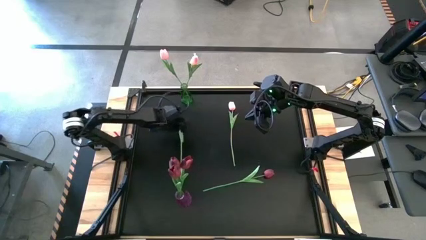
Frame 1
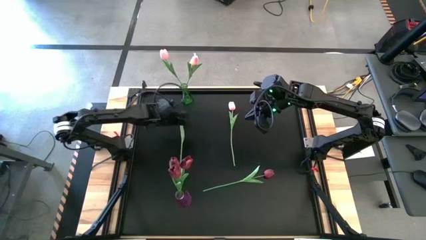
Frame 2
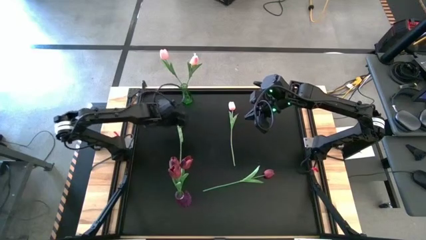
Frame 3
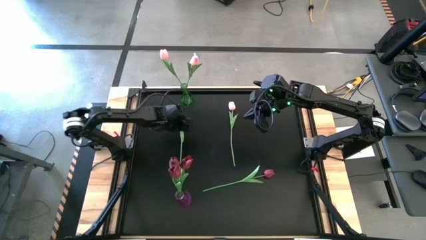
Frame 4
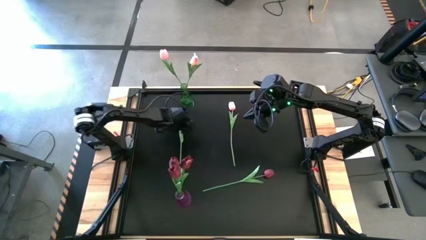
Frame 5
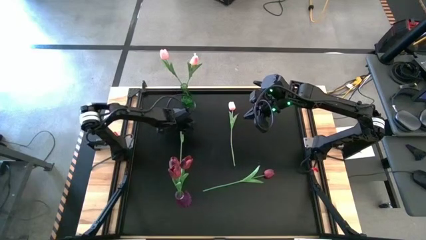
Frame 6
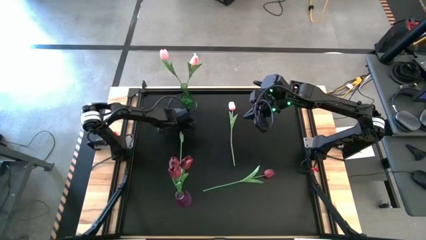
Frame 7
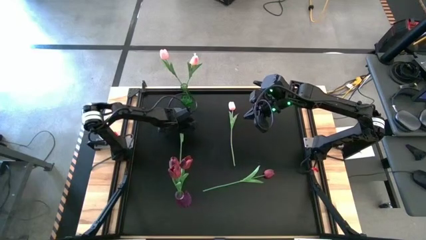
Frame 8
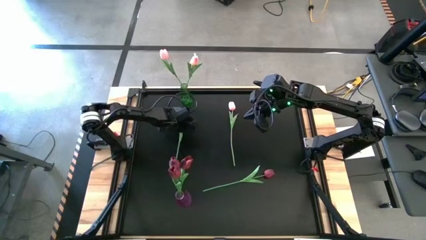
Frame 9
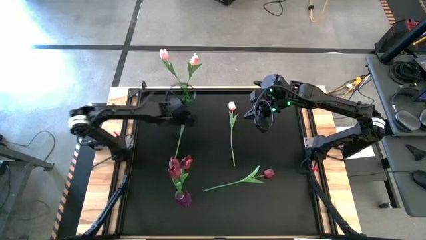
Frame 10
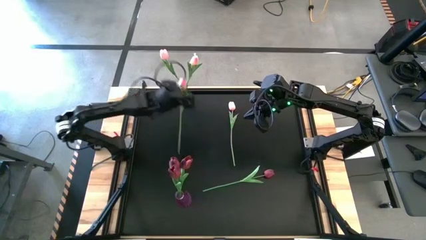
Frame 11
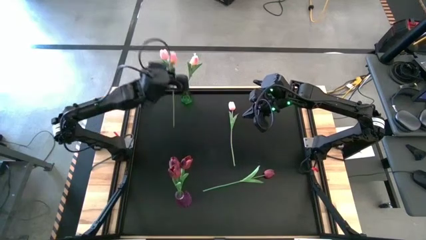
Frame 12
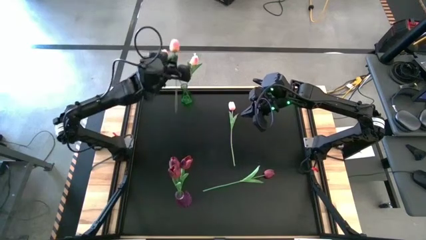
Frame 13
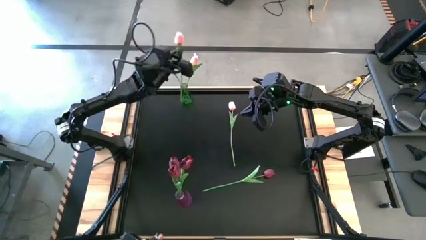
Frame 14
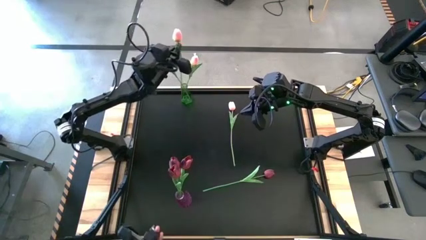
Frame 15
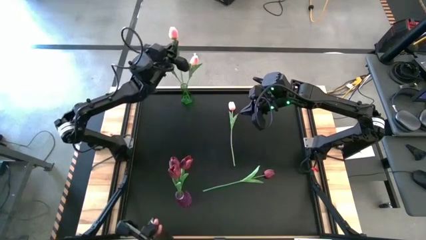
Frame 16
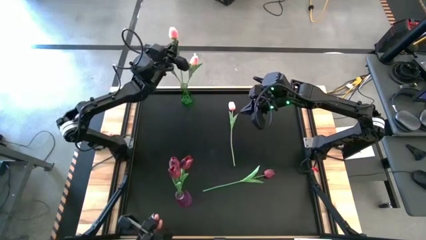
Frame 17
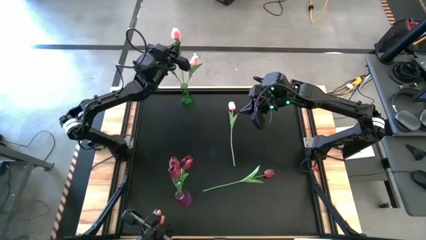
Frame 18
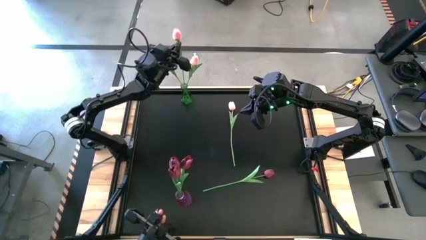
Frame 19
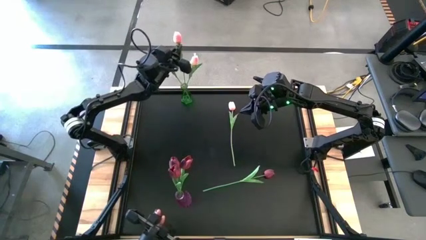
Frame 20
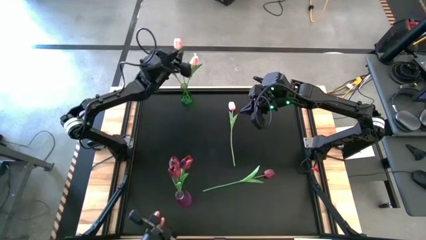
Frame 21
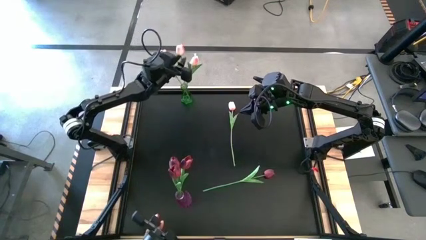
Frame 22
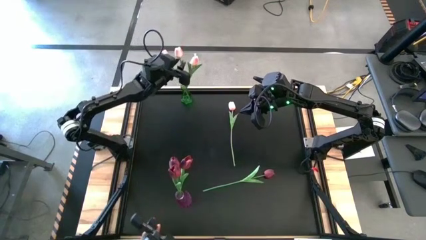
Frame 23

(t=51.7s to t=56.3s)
Task: Sort flowers into vase by color
Put the left pink tulip into the green vase

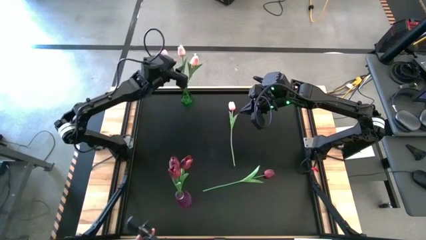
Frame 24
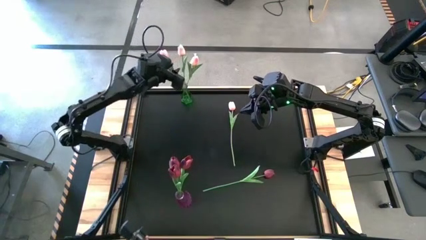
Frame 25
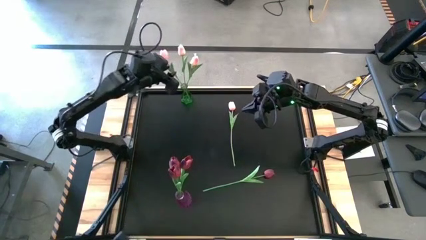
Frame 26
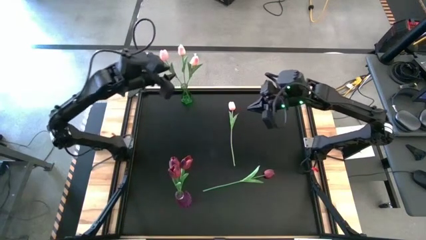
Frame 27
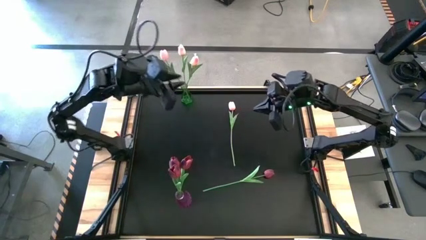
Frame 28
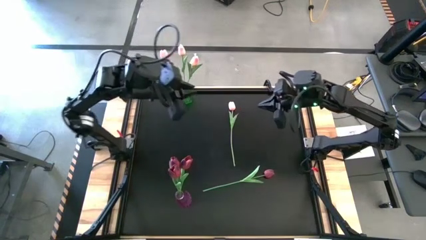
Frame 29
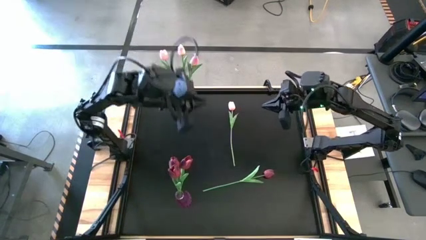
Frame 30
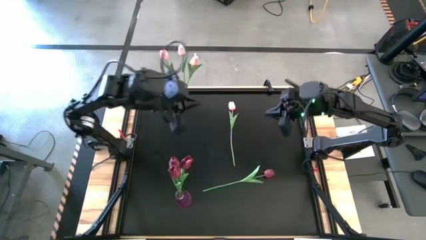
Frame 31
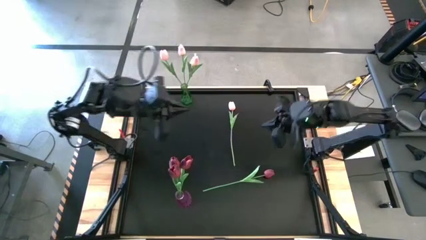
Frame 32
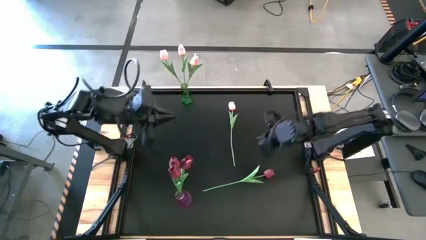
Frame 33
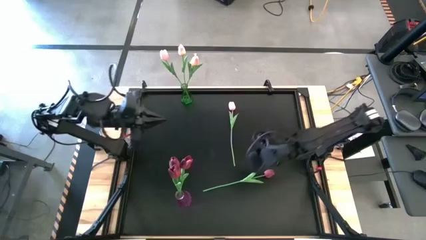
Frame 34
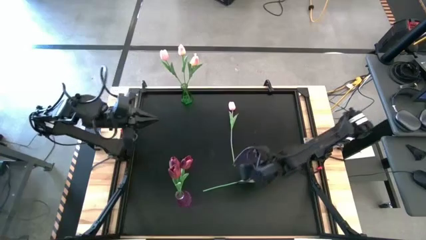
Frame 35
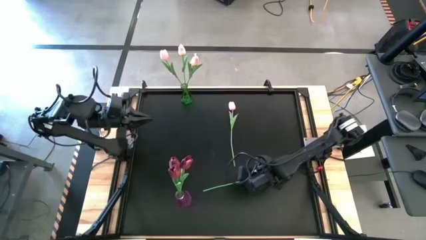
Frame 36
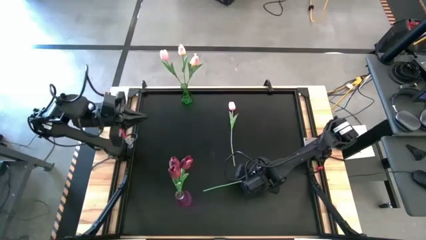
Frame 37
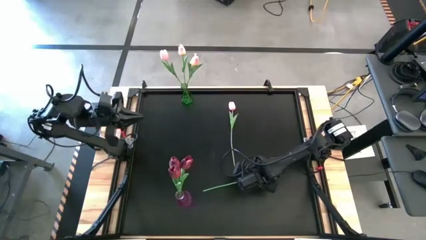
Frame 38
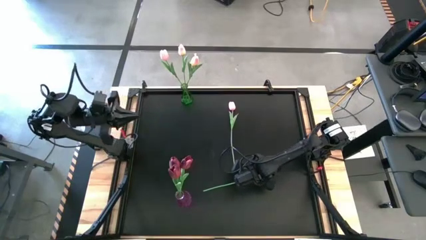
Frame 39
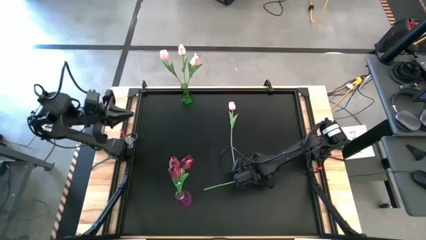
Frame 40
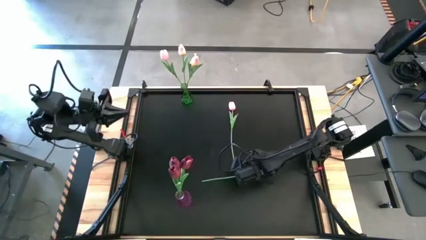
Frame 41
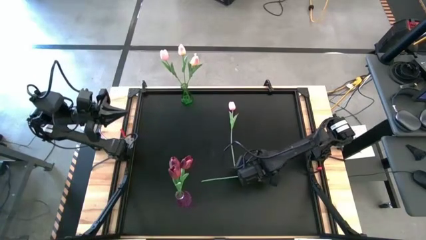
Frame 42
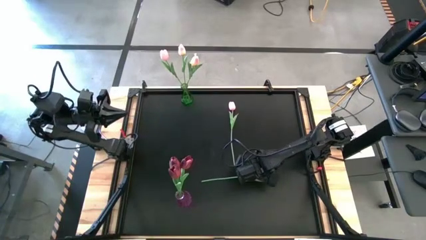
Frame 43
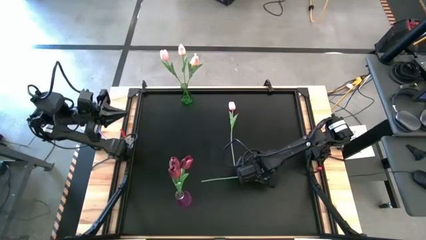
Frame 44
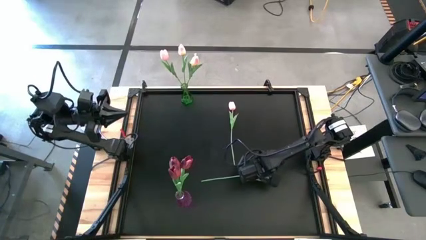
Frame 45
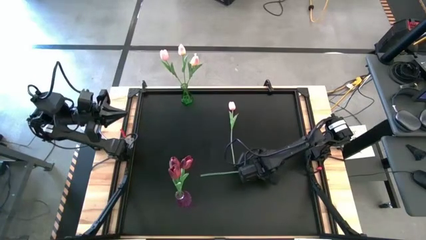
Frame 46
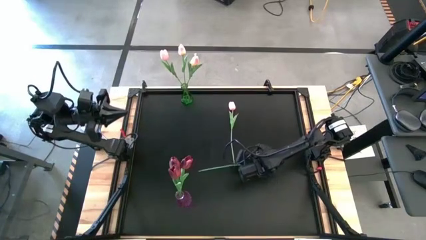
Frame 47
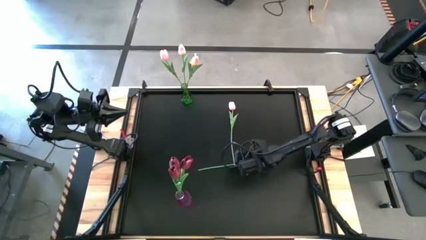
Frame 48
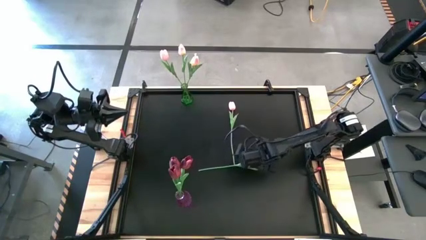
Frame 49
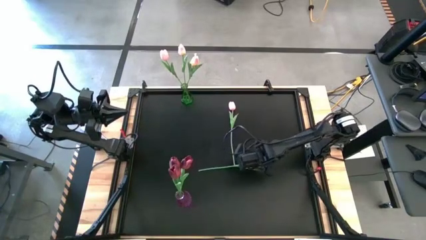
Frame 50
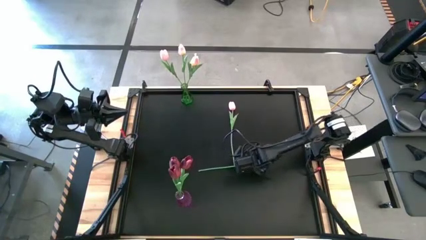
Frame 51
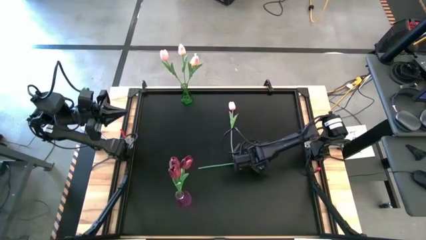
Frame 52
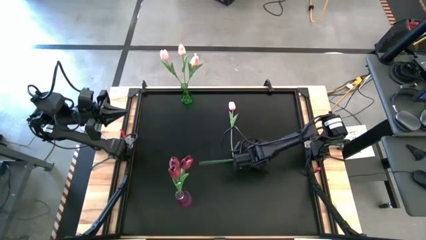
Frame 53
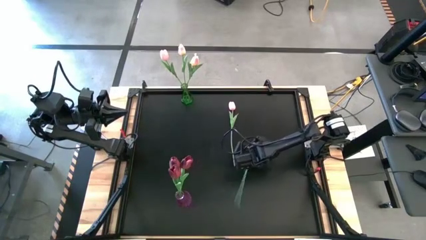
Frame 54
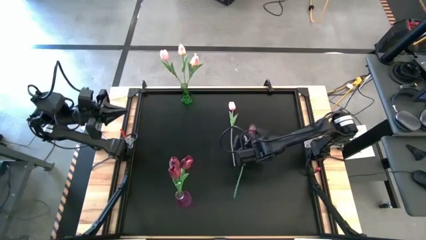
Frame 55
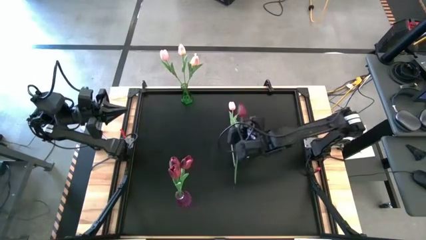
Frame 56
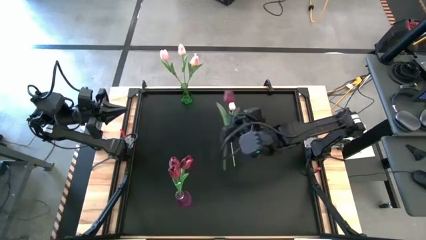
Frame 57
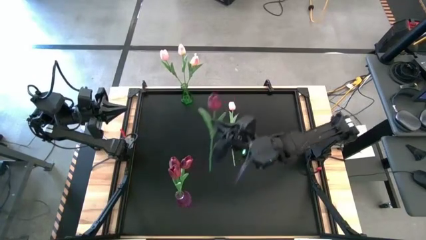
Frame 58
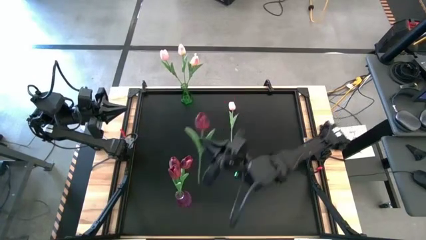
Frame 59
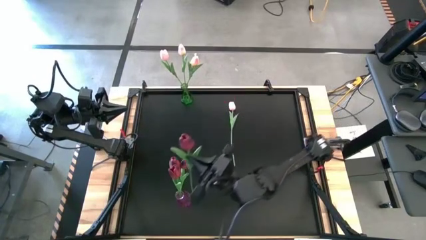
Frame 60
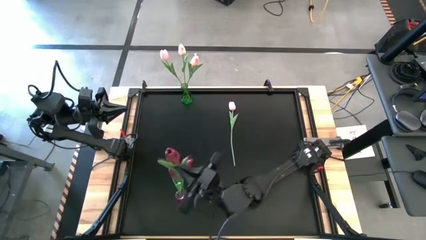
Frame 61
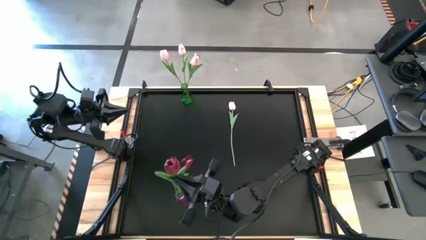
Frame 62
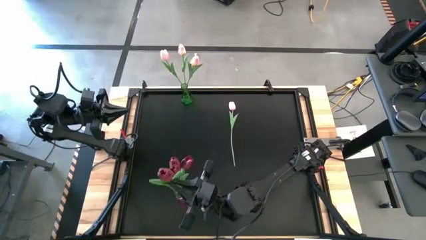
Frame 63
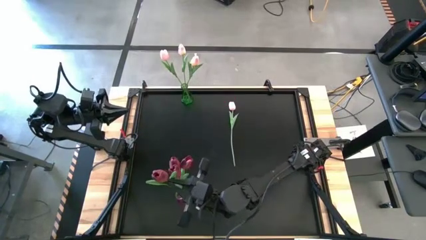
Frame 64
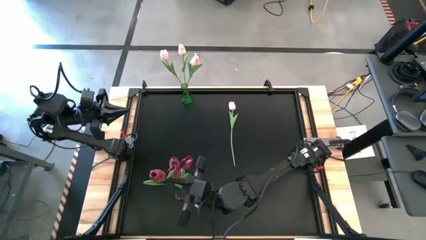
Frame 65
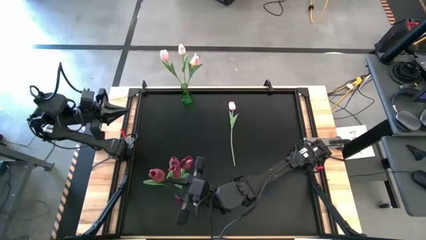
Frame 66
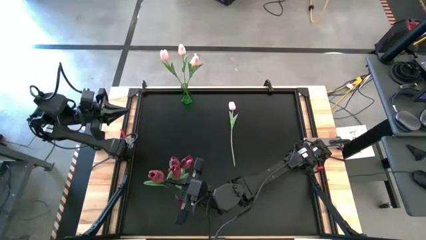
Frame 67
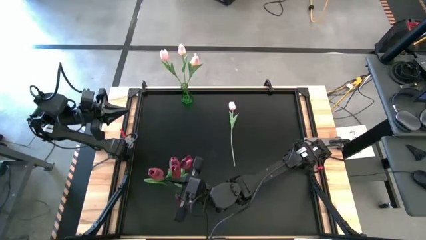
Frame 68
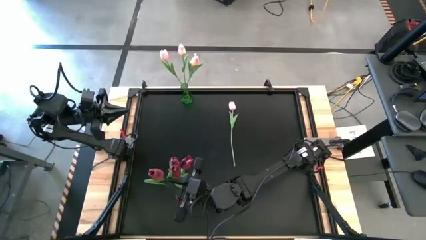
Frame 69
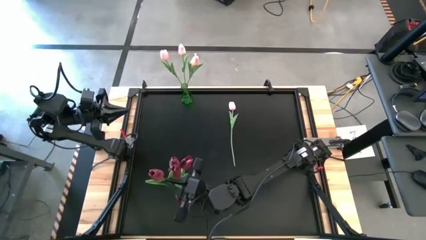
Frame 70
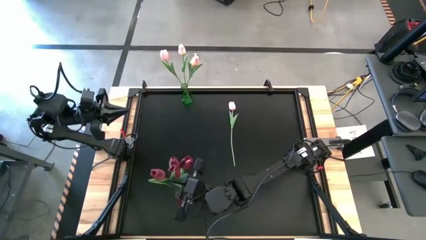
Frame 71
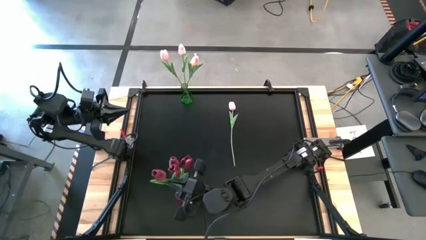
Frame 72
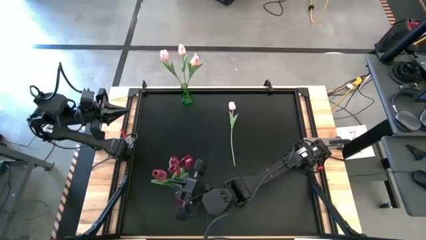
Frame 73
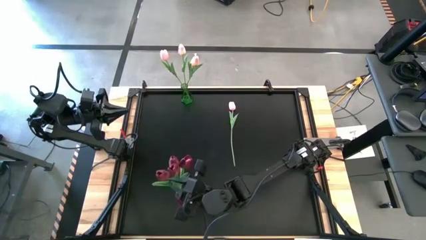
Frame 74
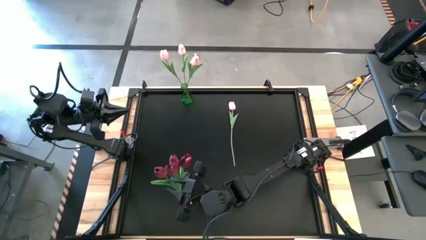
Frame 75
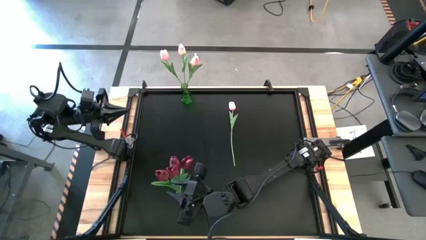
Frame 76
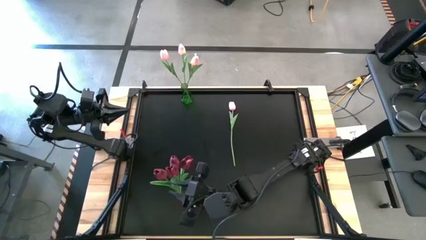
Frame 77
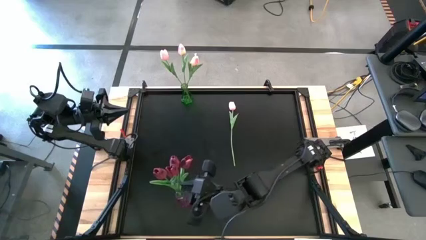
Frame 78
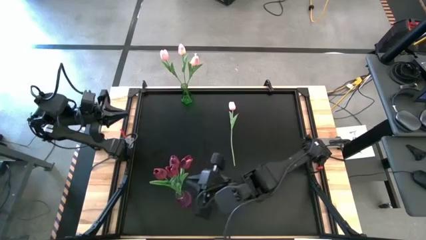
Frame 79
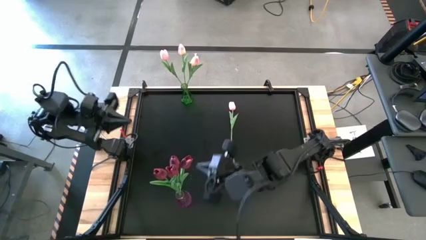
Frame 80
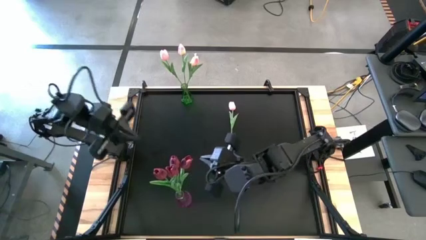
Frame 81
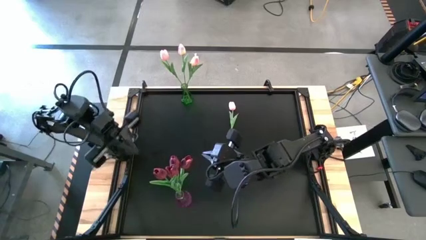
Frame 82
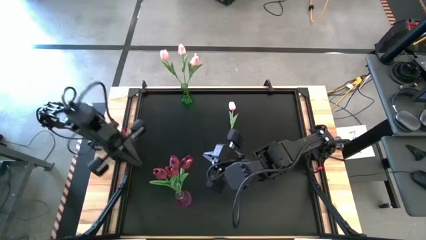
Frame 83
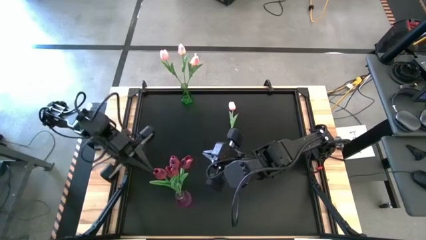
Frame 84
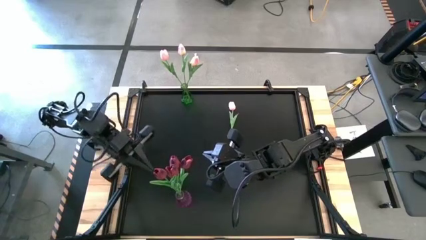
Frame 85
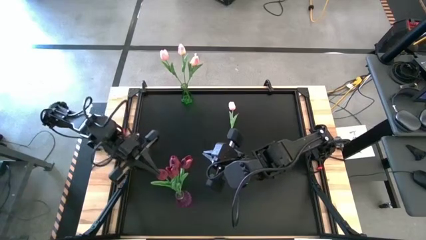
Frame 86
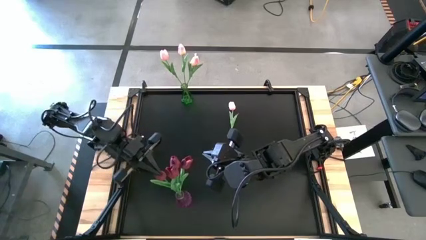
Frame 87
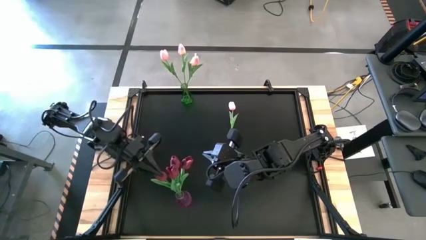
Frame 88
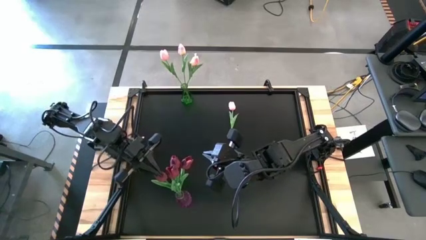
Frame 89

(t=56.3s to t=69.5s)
Put the red tulip into the purple vase
